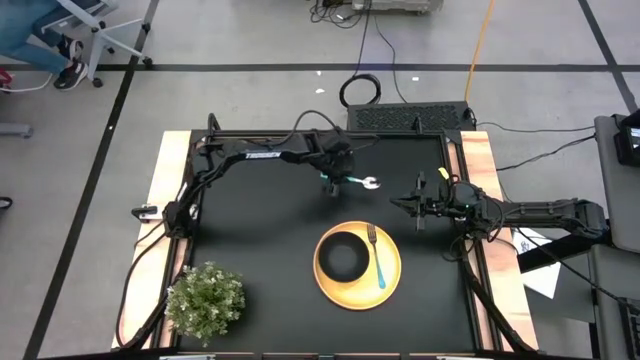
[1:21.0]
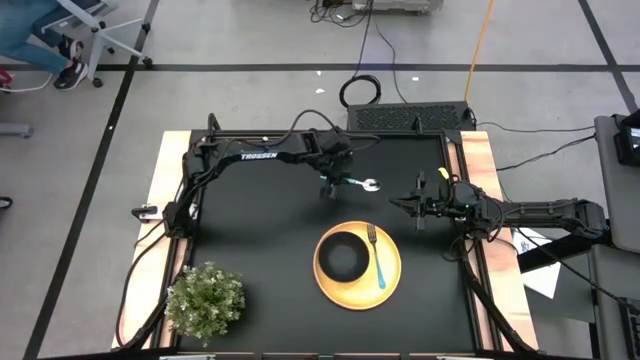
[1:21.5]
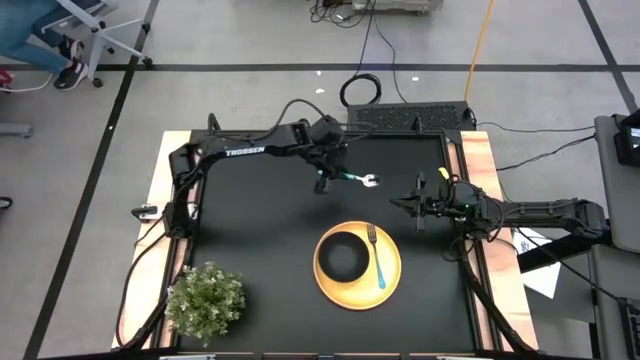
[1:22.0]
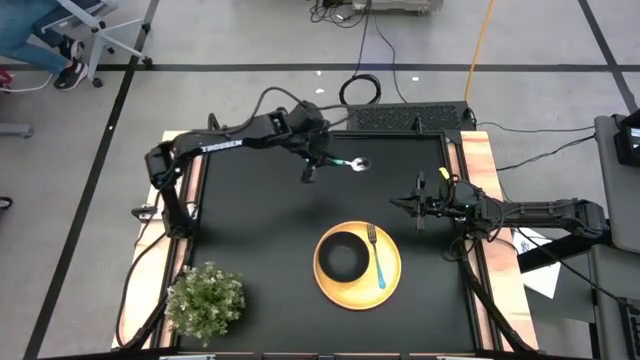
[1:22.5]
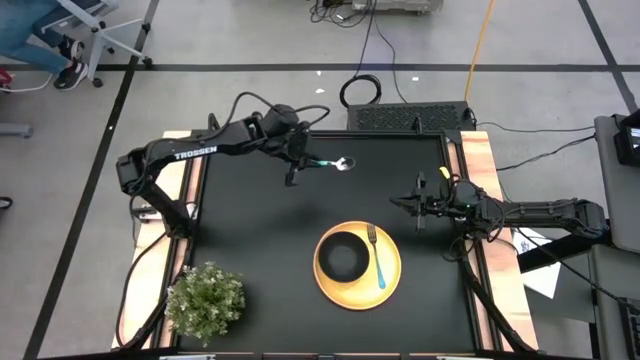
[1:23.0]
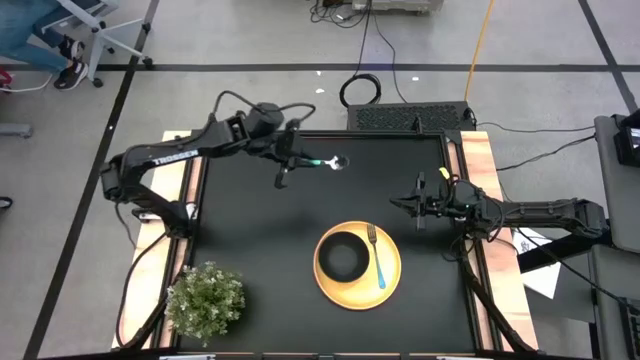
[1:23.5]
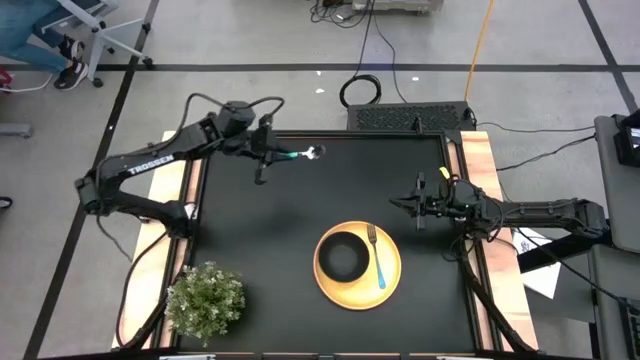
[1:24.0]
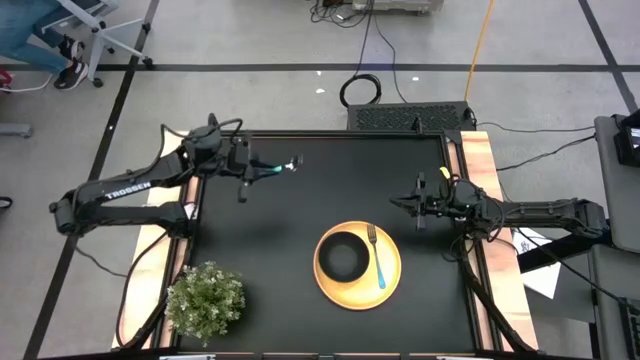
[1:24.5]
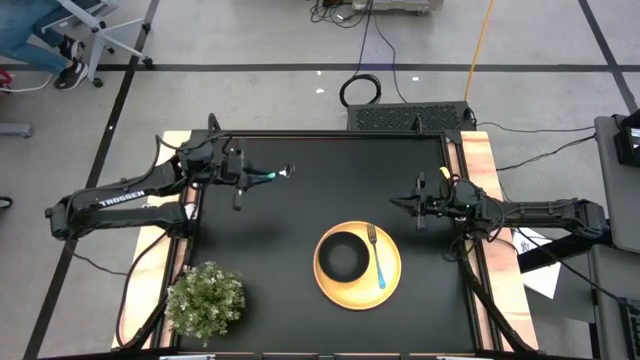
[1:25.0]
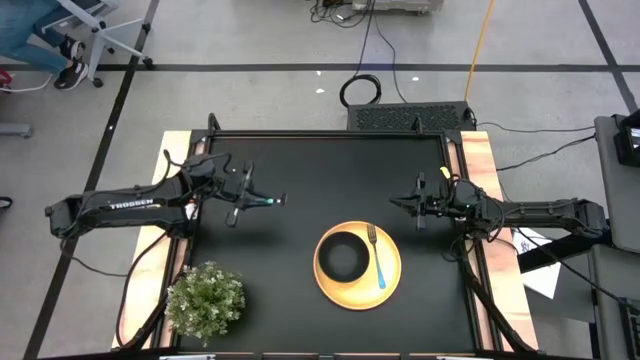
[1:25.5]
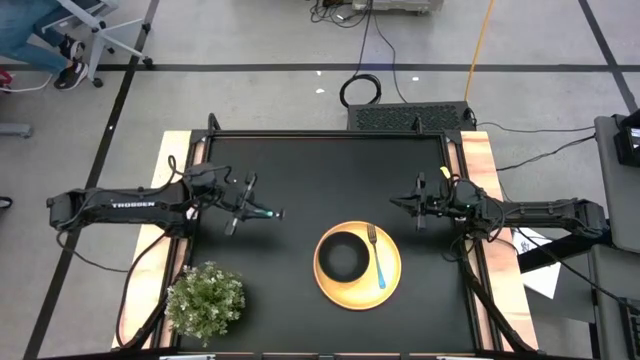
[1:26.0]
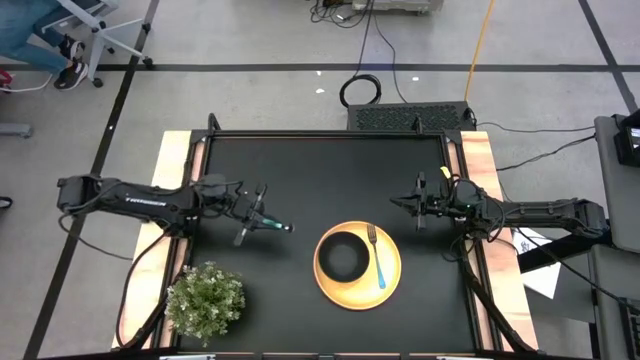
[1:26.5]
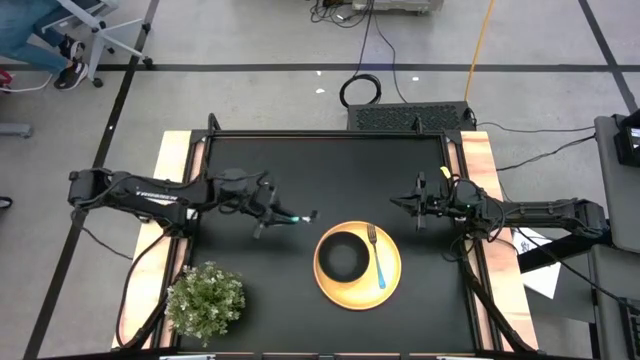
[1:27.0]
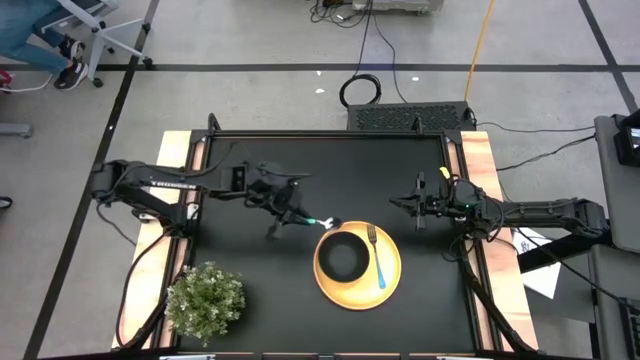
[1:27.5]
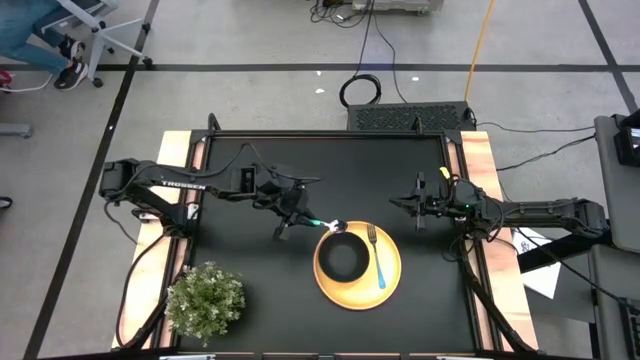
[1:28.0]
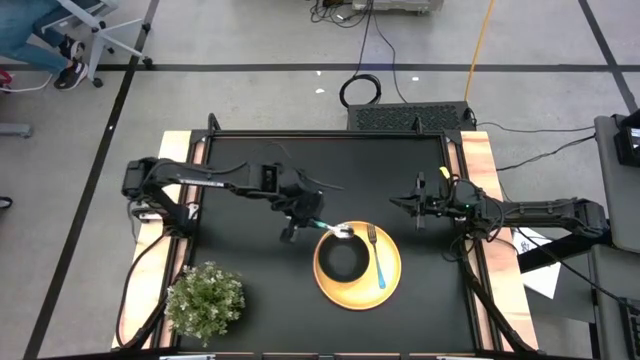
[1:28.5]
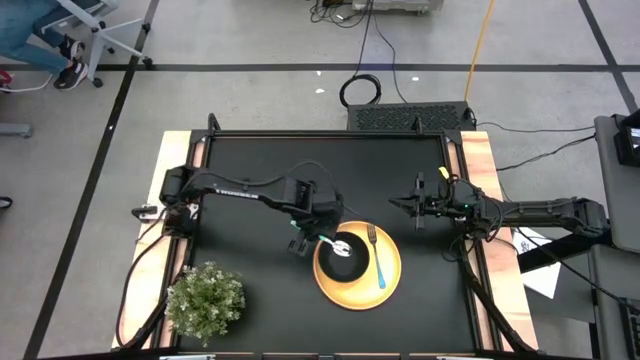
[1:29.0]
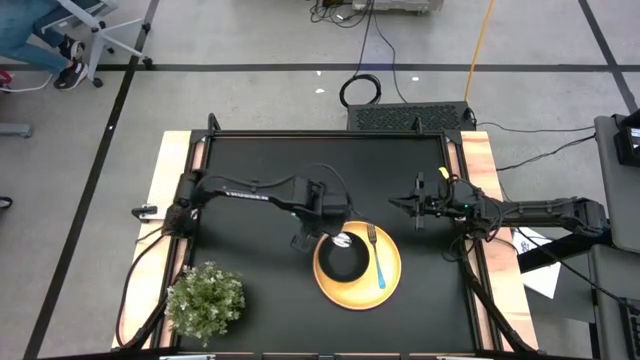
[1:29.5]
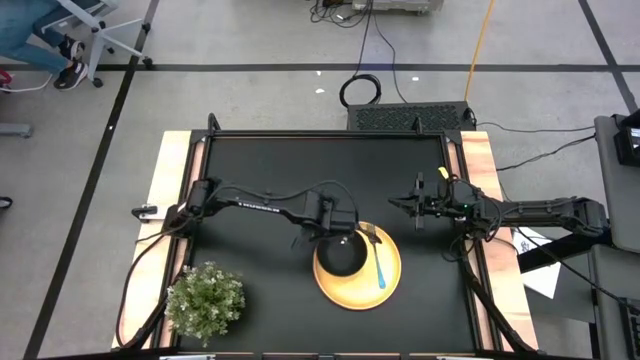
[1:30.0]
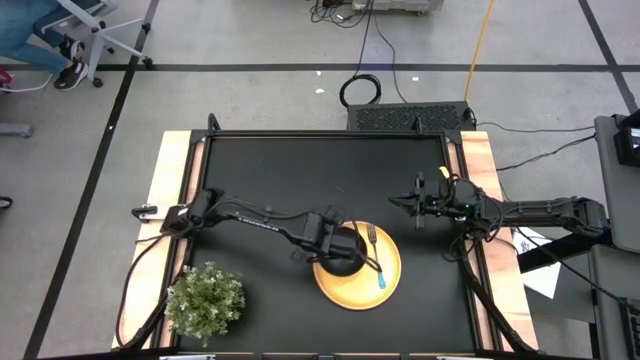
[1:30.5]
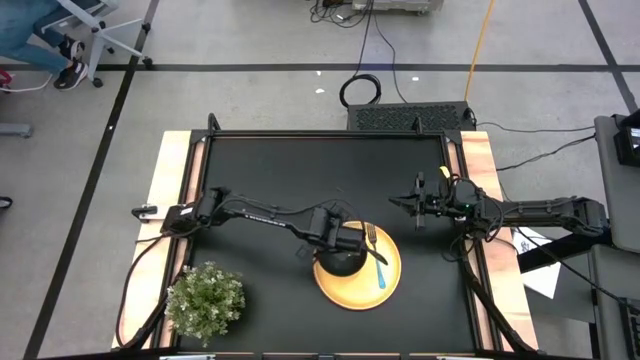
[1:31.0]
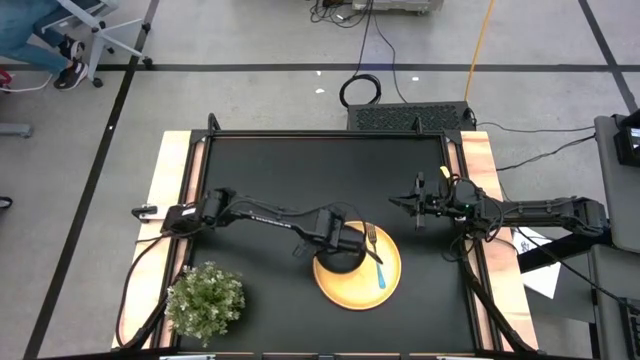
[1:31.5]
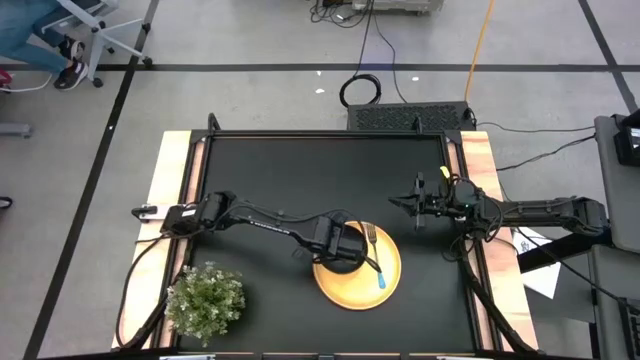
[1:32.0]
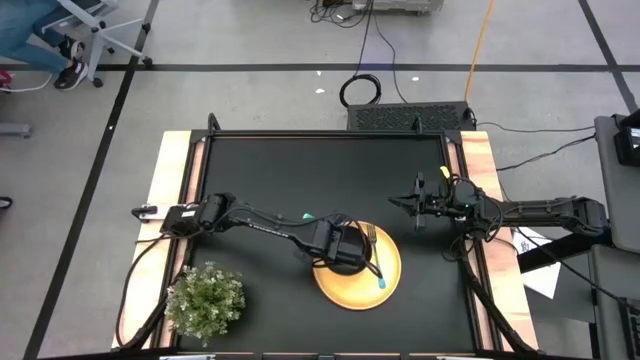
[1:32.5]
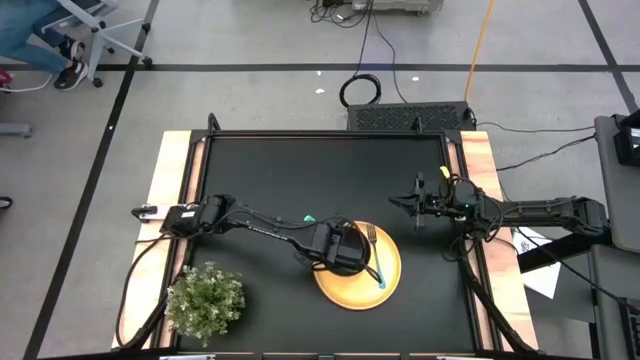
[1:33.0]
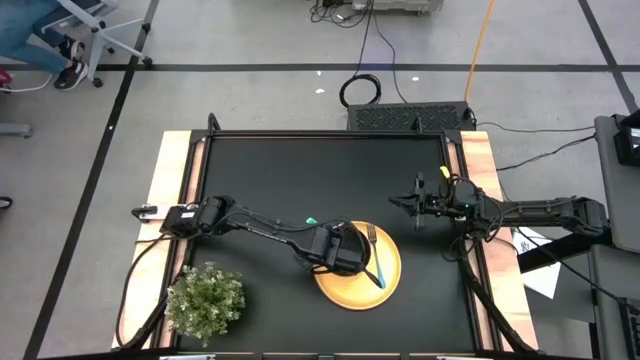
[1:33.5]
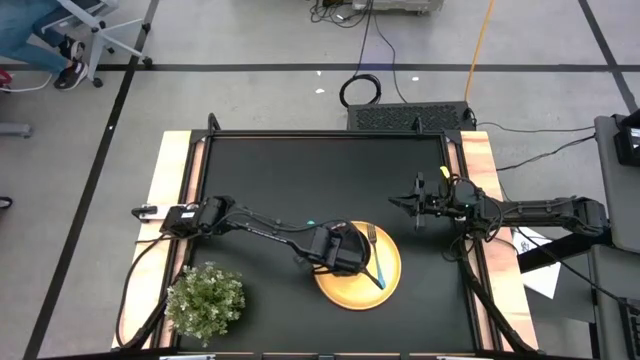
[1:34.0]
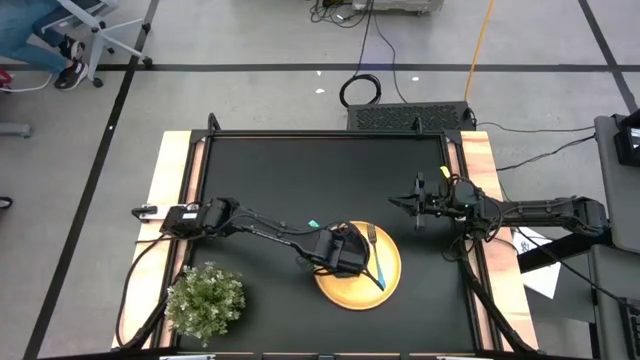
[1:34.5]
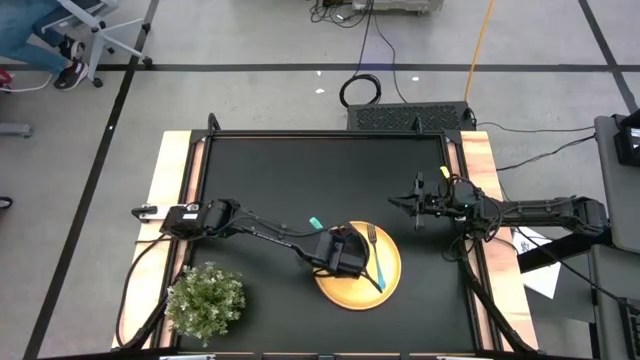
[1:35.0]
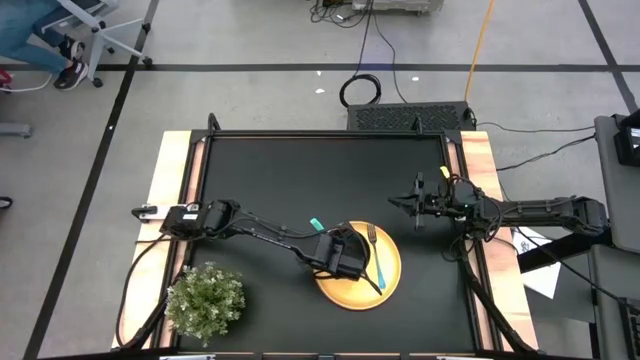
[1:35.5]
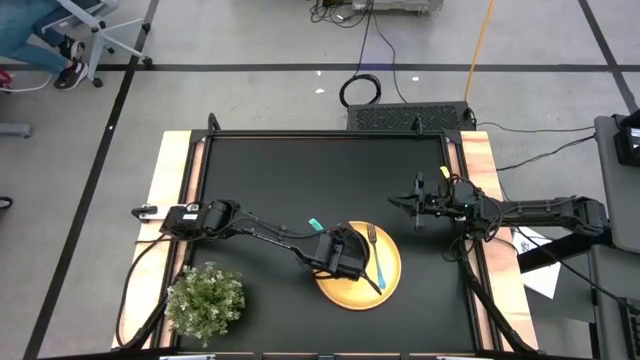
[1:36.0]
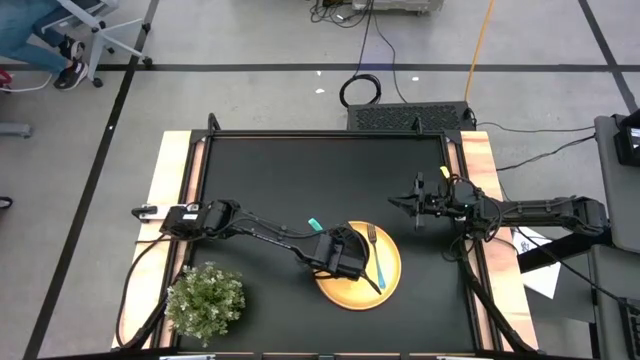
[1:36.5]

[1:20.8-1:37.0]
Task: Set table place
Put the blue spoon into the black bowl

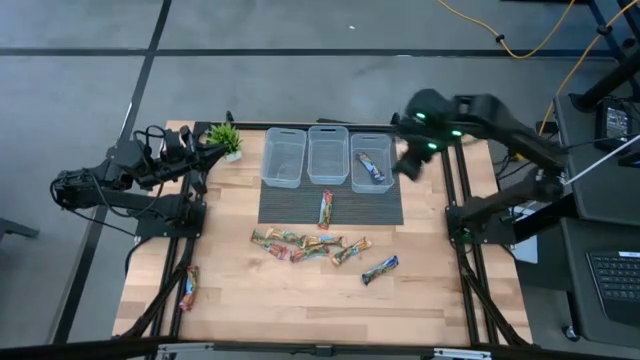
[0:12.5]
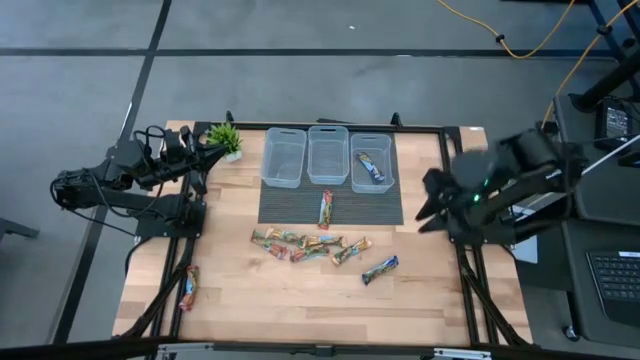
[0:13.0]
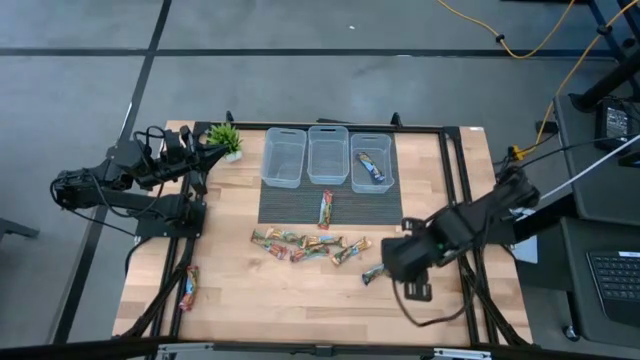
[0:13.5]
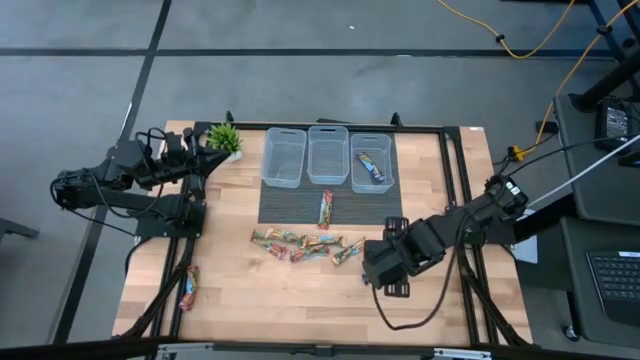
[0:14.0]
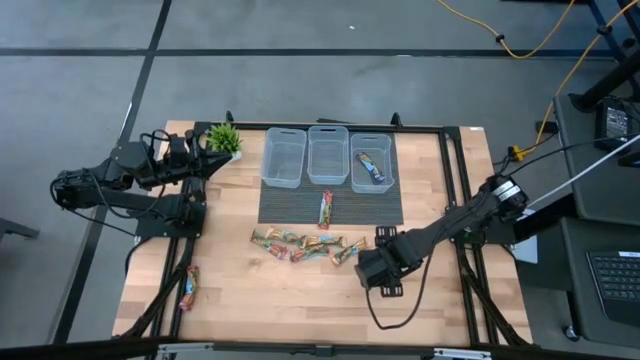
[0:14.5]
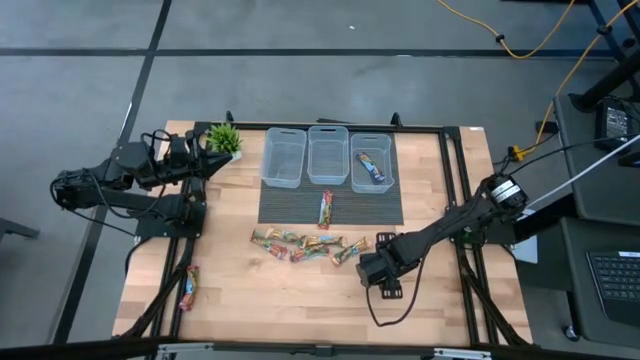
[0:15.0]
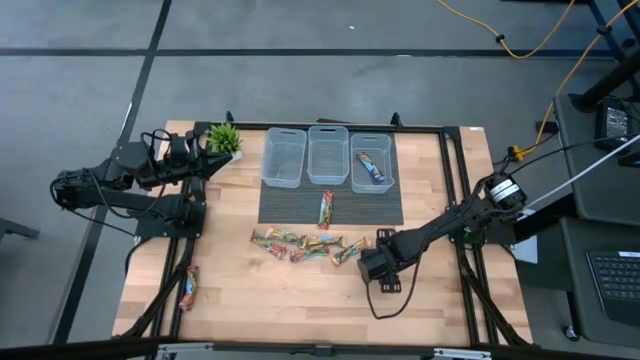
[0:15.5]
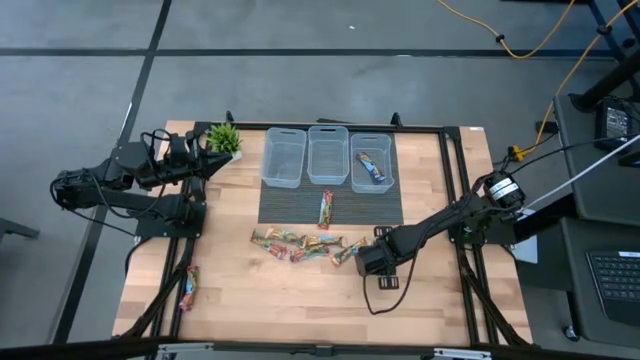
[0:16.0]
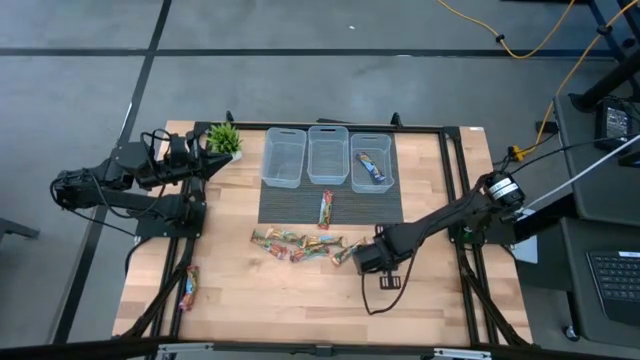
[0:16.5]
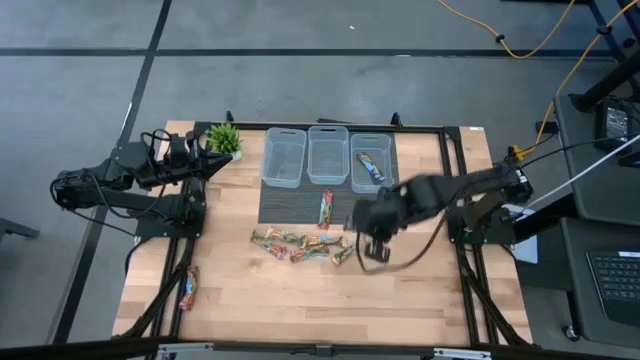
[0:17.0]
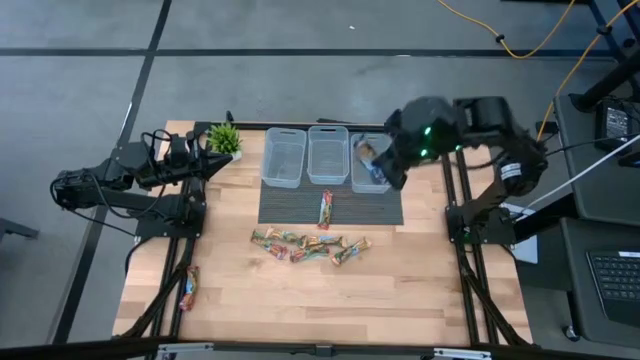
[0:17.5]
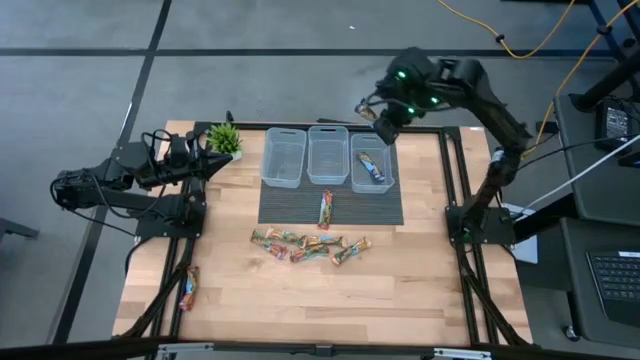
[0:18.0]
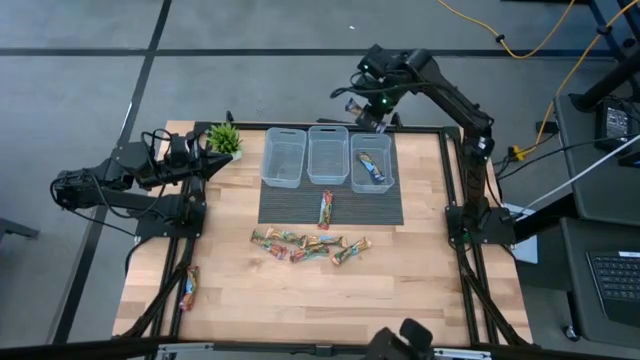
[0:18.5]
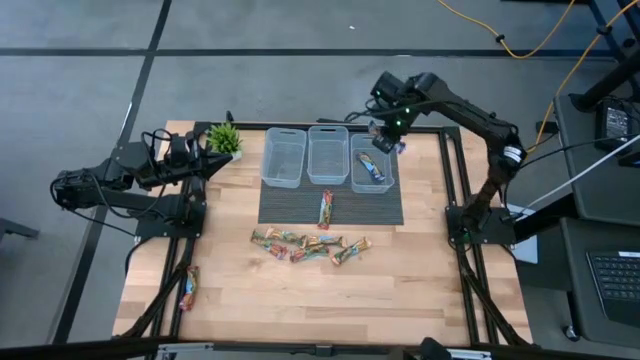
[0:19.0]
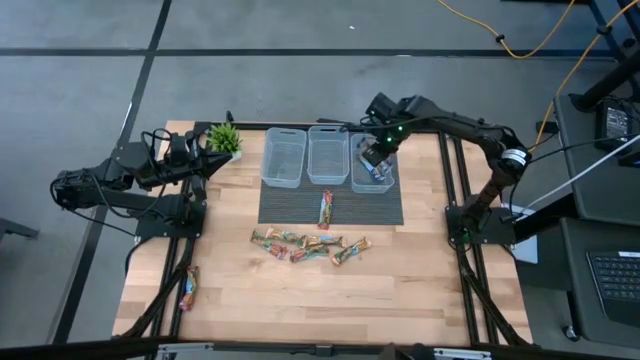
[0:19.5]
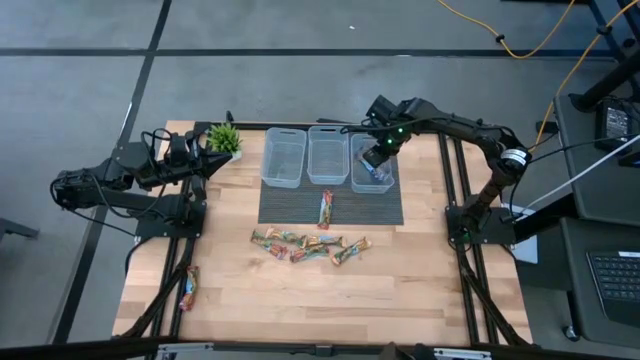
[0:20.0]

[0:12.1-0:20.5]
Task: Pick and place Granola Bars by type
Put the blue snack bar into the right transparent bin
